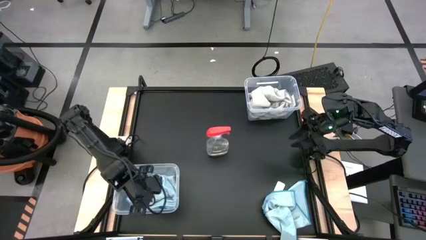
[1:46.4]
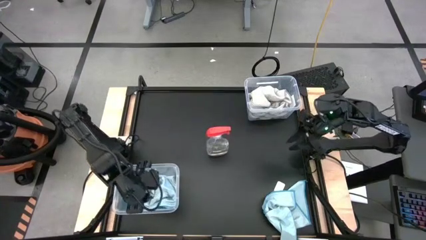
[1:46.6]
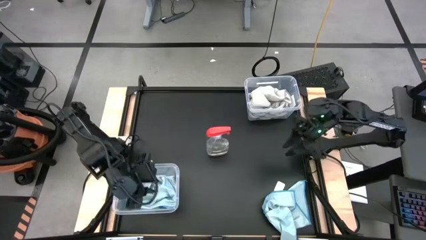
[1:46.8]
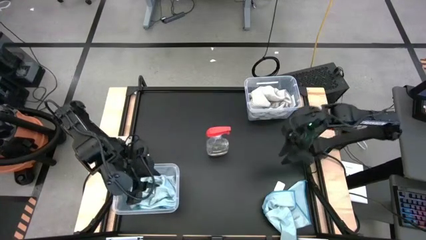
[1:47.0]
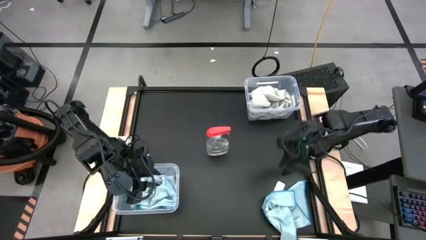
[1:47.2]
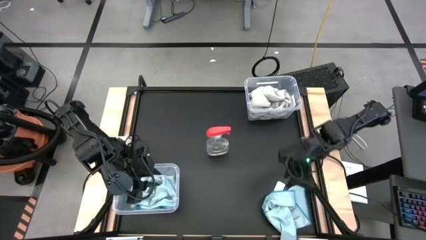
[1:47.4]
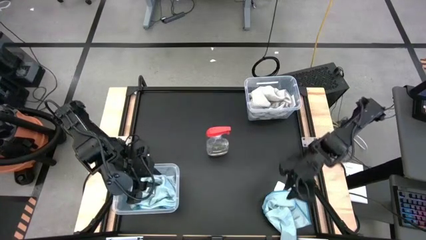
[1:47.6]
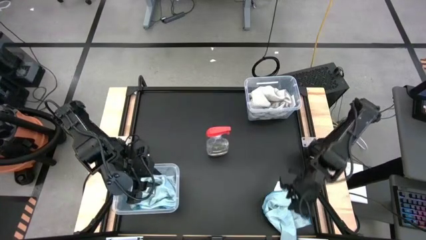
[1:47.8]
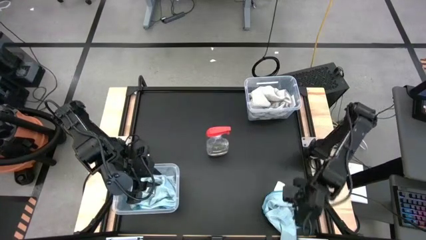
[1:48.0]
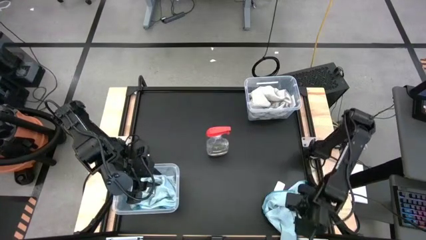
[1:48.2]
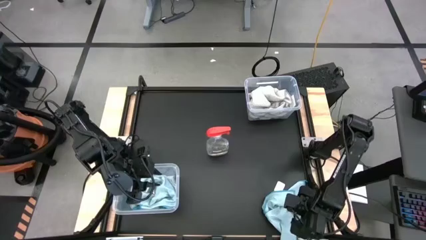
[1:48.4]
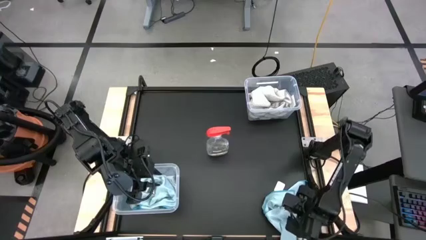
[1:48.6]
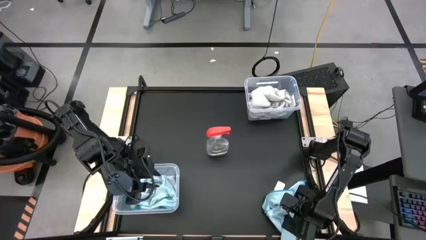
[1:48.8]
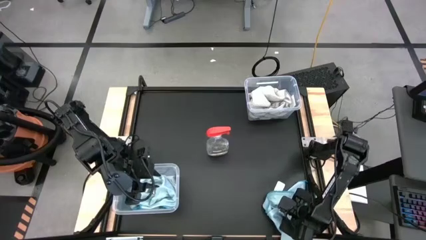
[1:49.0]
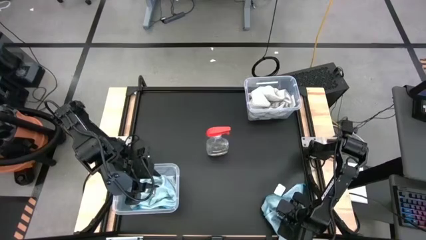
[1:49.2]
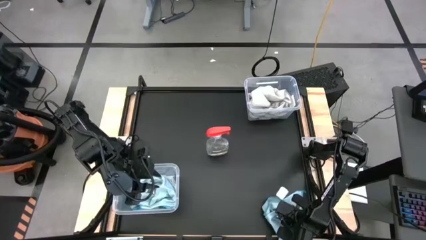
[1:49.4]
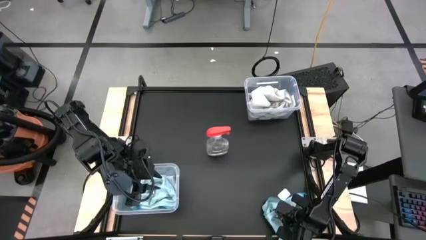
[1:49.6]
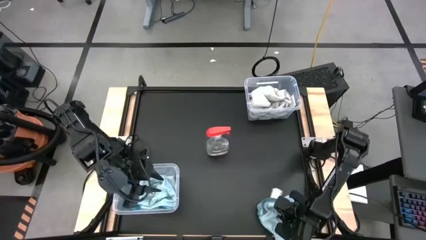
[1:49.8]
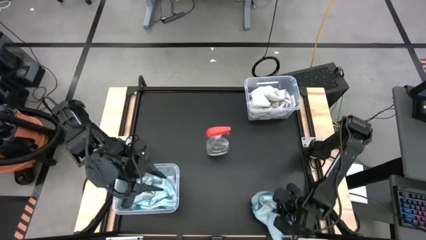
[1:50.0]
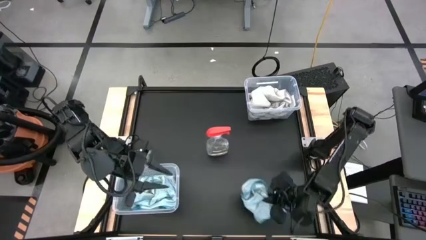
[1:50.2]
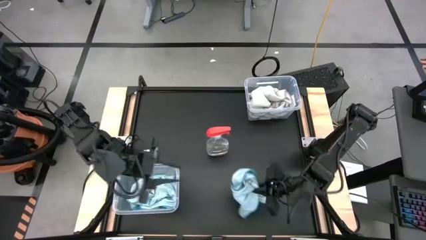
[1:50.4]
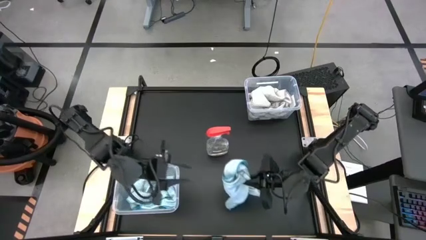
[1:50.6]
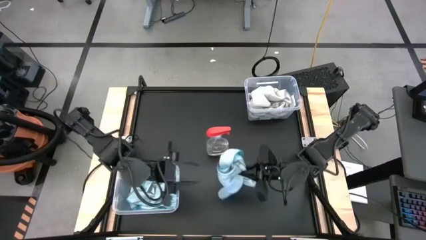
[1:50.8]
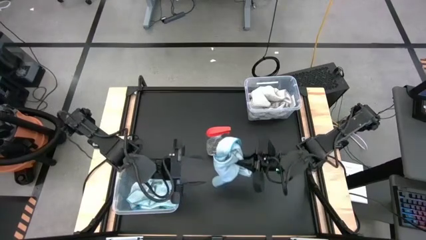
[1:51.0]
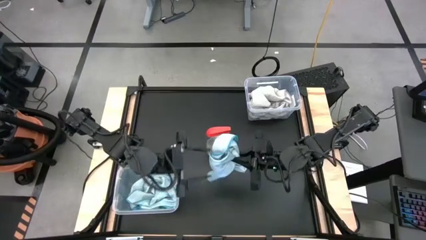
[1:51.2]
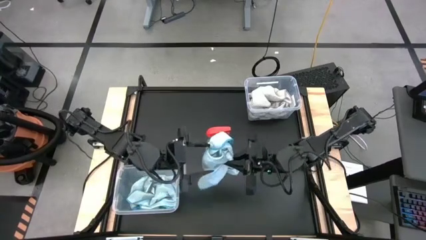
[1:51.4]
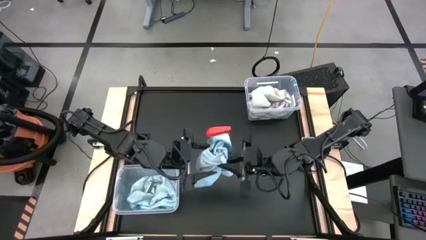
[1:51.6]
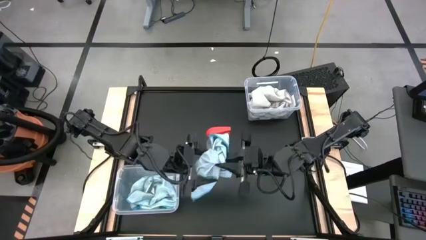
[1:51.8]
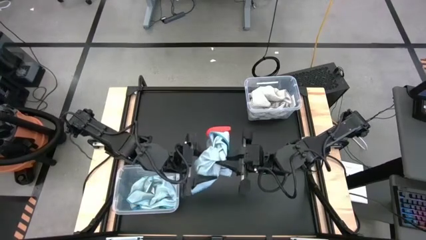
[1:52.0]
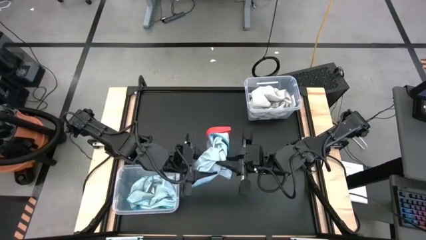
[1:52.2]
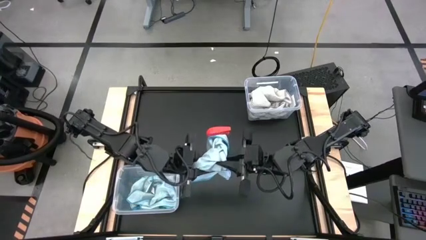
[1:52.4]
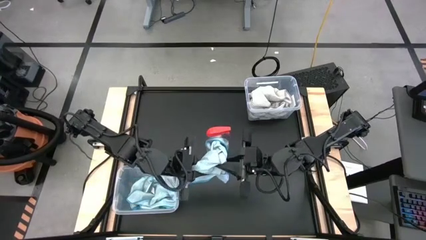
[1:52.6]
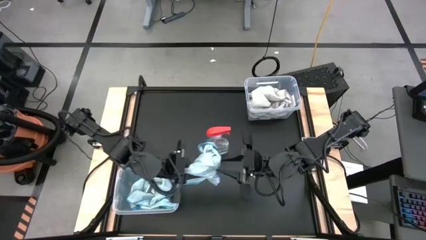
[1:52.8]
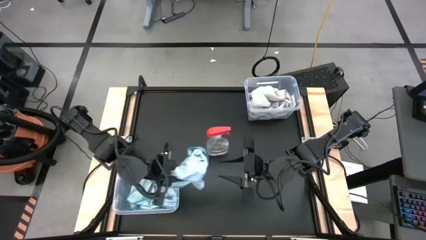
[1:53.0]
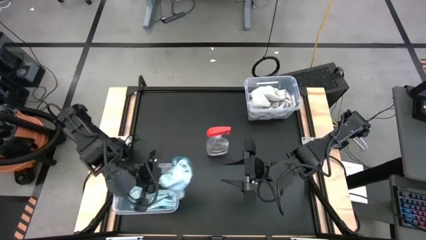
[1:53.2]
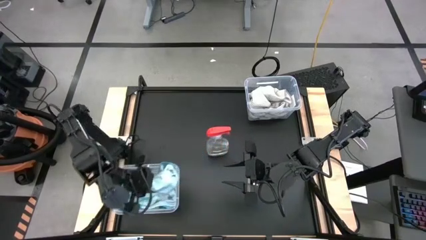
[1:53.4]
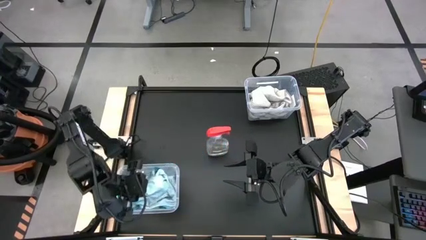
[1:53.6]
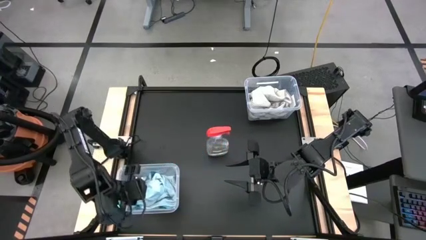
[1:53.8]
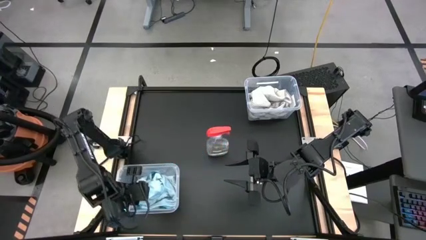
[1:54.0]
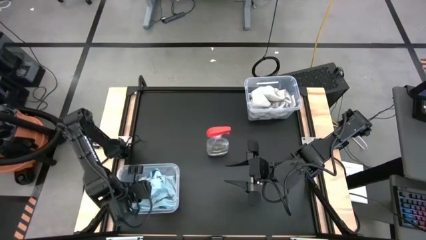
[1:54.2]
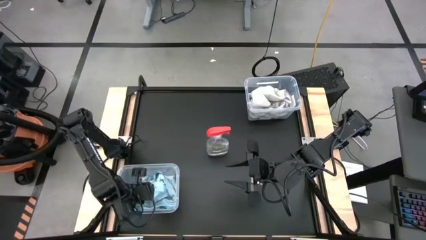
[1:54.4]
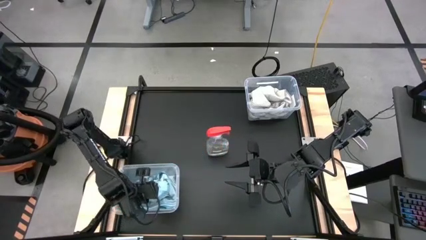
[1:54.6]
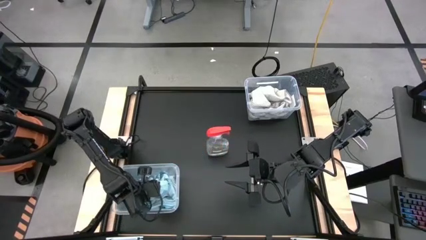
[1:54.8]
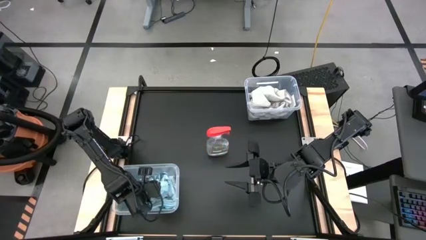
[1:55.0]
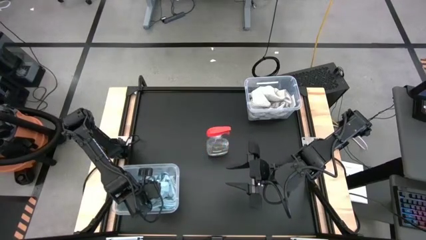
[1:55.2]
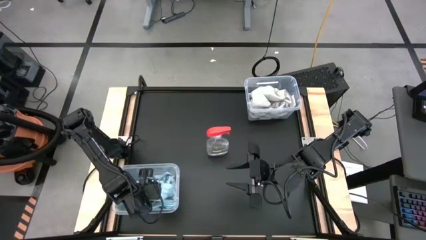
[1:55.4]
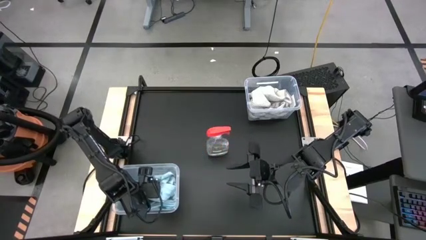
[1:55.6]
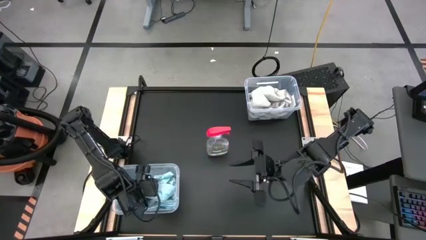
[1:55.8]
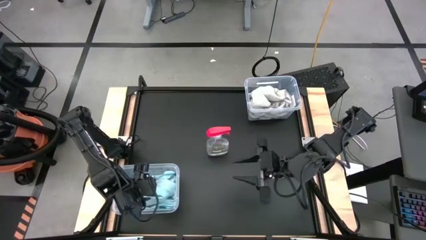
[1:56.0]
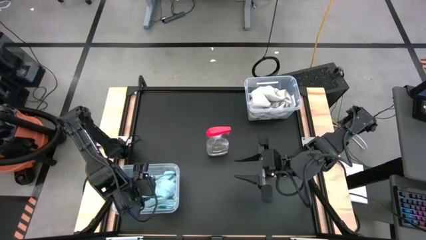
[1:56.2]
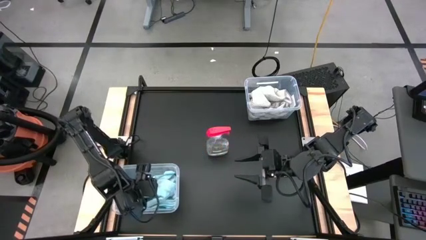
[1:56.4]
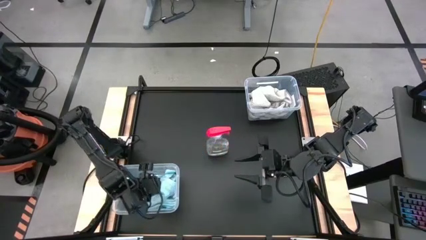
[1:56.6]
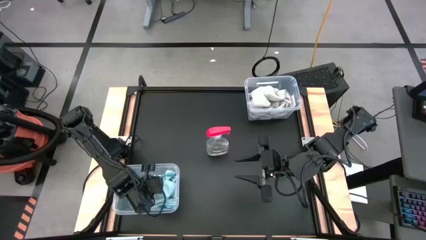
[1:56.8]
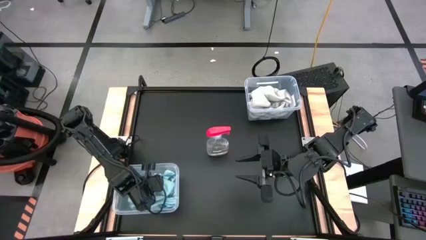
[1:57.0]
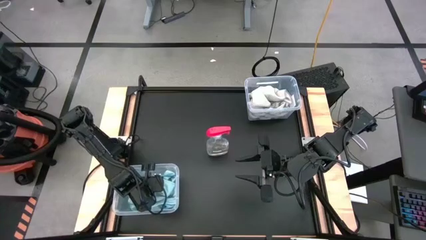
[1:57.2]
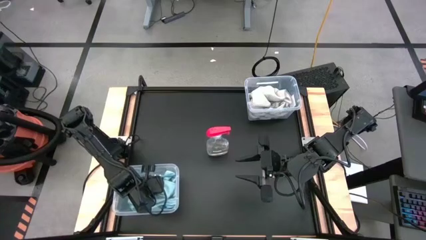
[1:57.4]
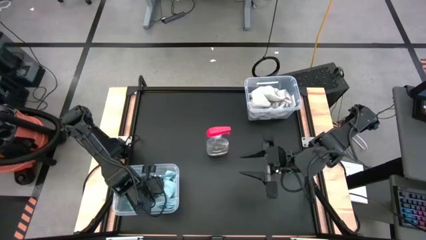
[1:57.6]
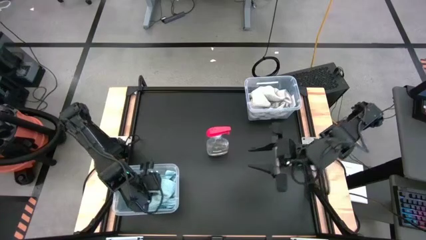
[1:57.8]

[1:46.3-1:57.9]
Task: Sort microfiber towel by color & place in baskets
Put the blue towel on the bottom transparent bin

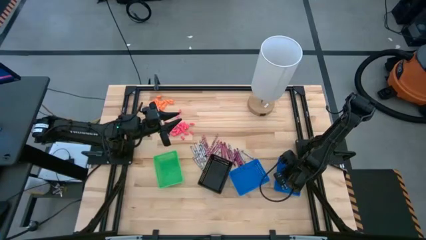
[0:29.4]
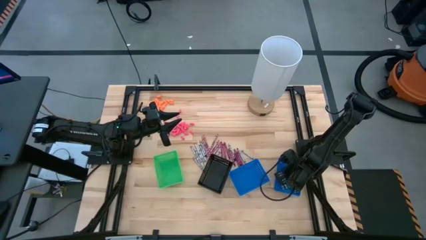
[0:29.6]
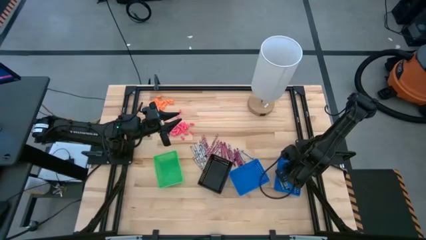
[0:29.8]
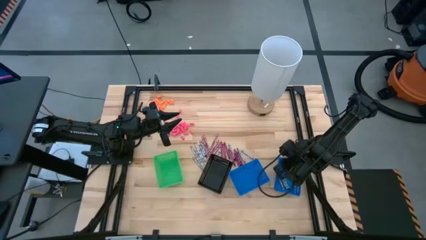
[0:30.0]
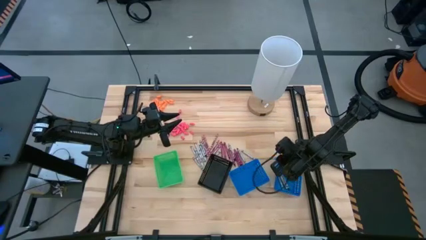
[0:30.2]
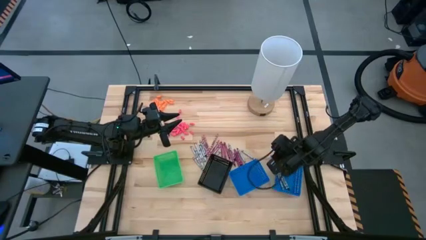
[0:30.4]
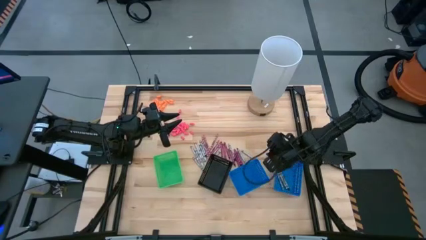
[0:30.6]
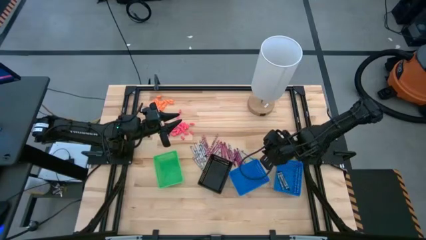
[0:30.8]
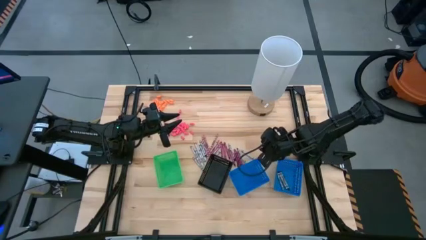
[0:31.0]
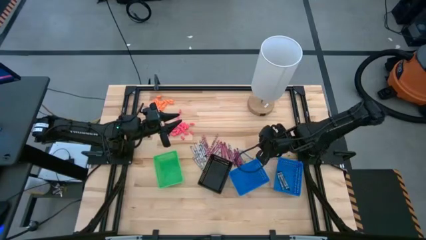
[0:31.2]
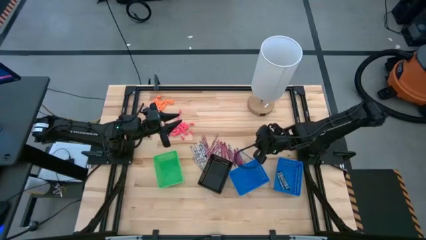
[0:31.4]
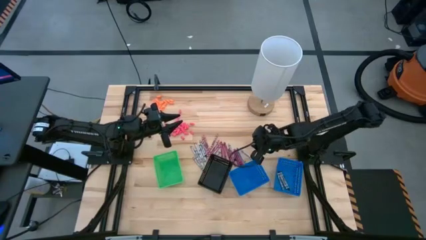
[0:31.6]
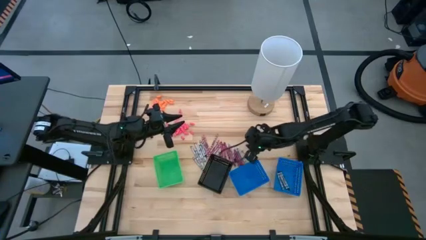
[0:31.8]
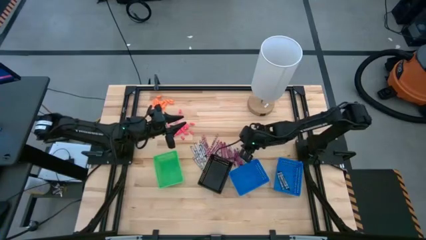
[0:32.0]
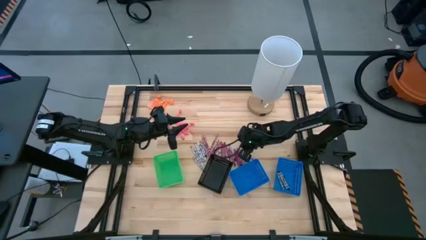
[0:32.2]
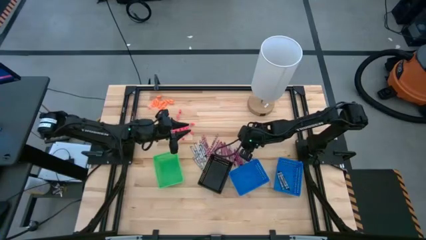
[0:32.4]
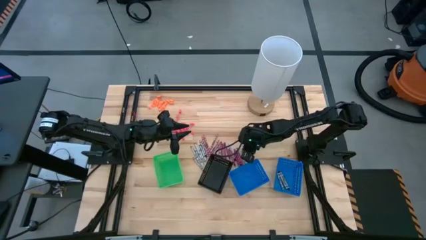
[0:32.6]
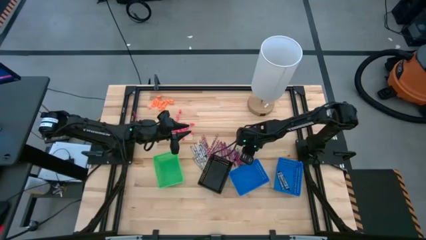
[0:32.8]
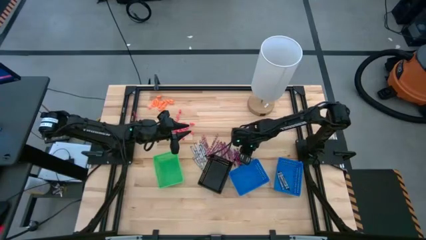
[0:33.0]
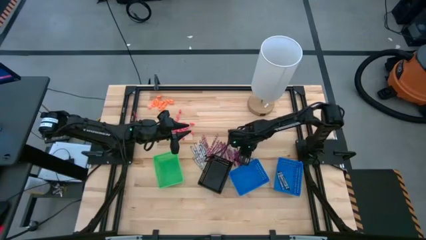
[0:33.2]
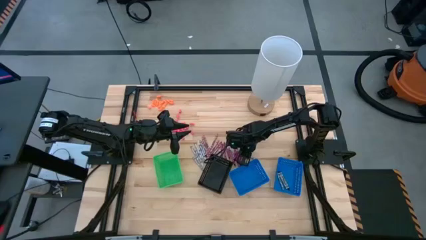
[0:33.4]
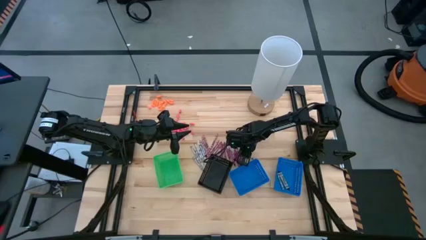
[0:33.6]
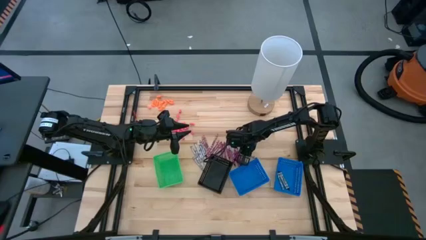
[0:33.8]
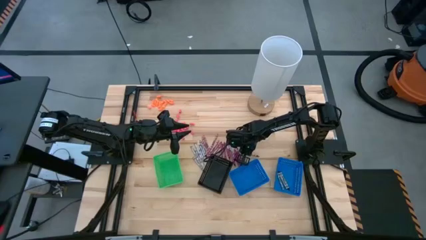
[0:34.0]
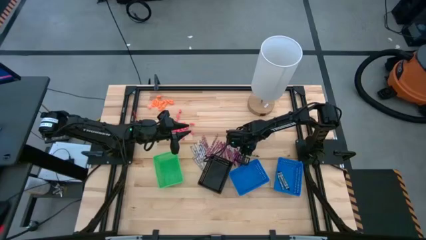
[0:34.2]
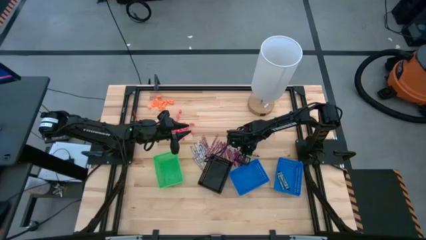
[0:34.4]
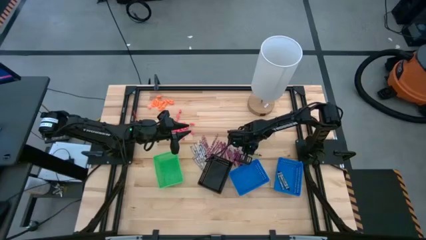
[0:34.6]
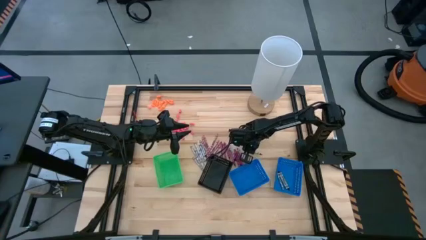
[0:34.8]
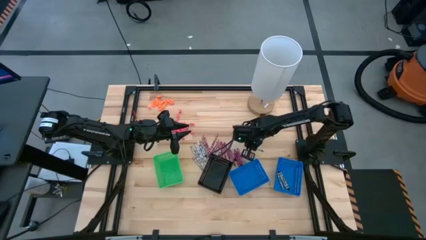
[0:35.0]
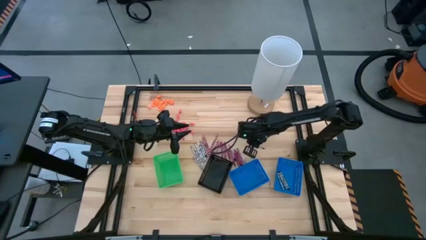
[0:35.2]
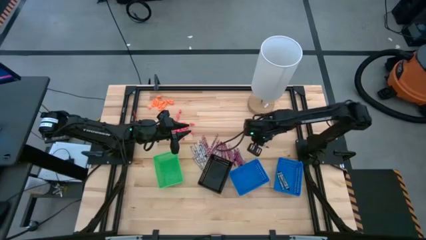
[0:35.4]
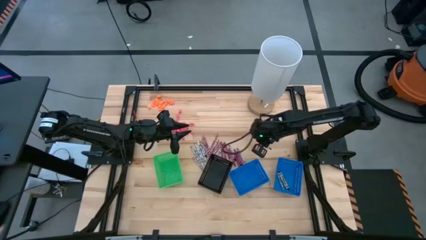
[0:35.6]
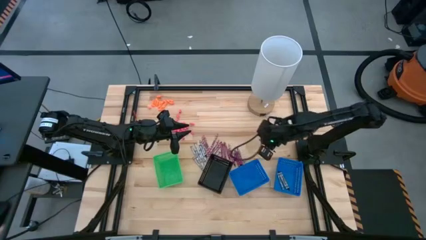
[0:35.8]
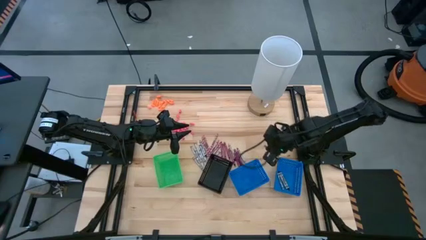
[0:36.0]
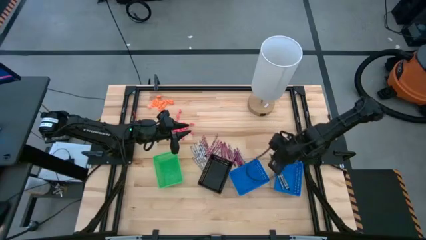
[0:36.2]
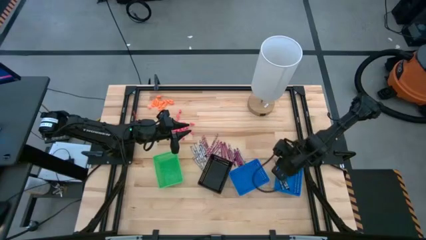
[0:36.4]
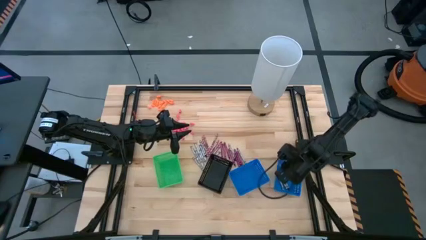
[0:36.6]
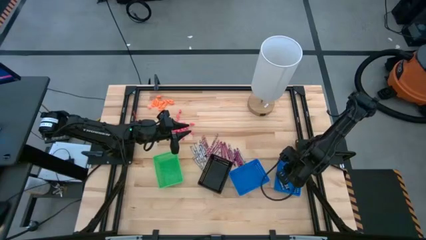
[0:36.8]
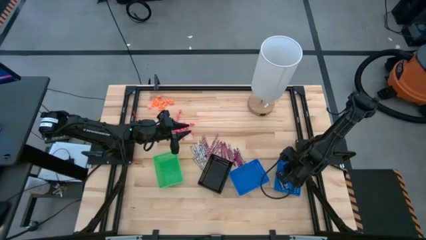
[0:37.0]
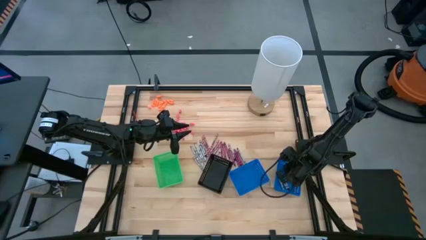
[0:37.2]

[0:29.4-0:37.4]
Task: Sort crayons
Put the black crayon into the right blue bin
